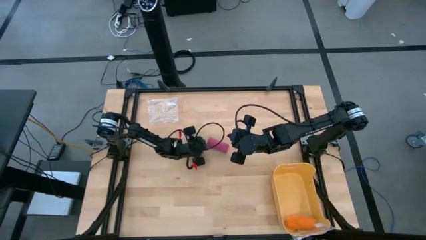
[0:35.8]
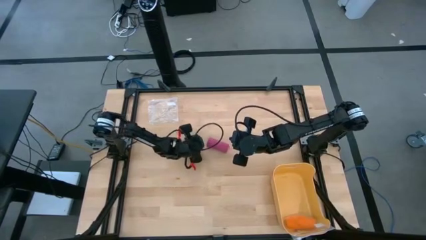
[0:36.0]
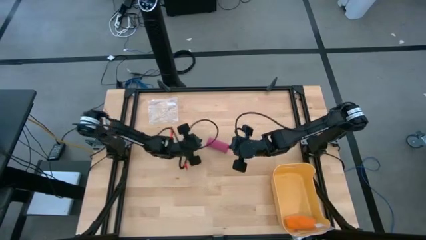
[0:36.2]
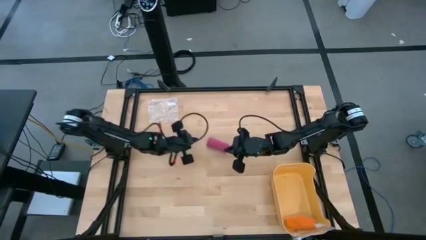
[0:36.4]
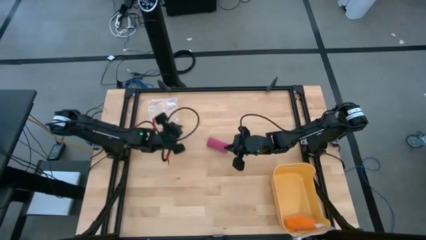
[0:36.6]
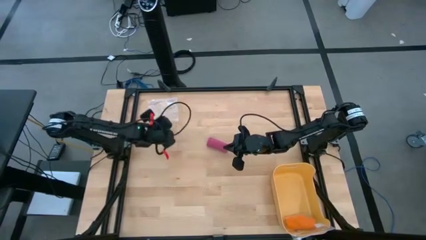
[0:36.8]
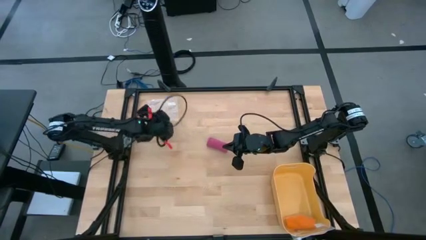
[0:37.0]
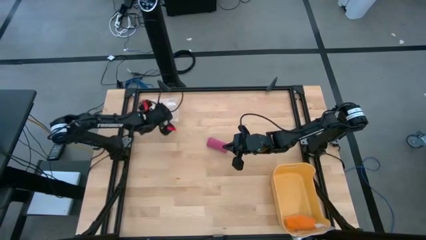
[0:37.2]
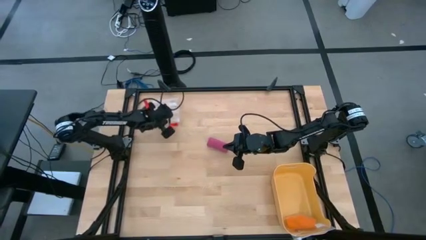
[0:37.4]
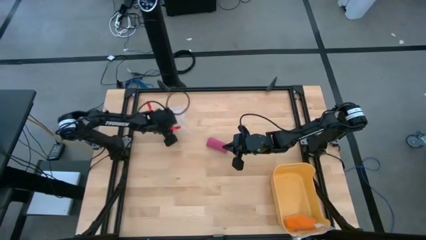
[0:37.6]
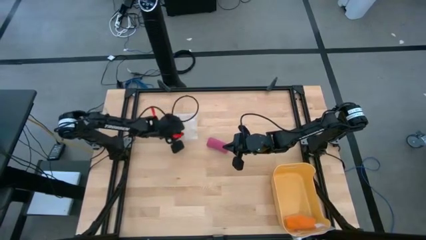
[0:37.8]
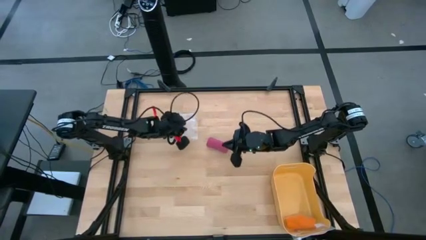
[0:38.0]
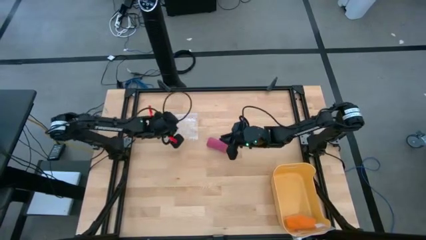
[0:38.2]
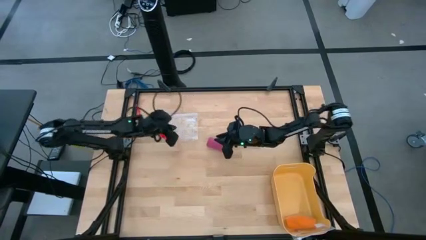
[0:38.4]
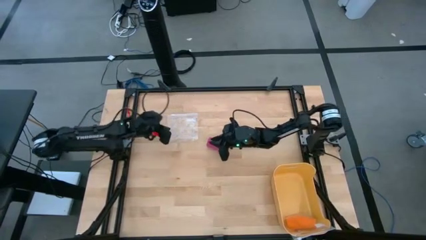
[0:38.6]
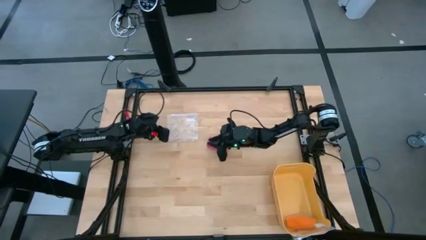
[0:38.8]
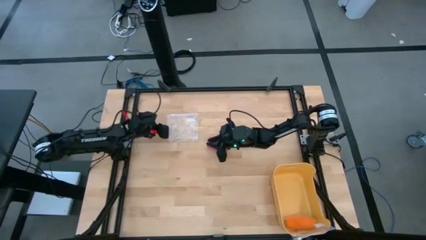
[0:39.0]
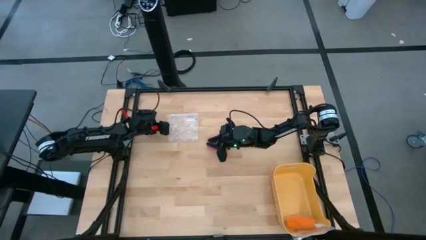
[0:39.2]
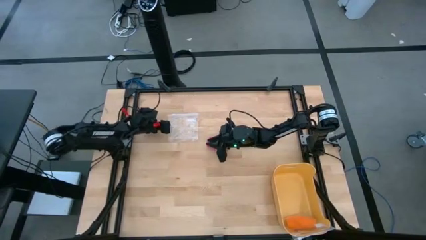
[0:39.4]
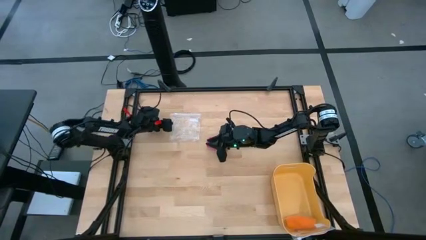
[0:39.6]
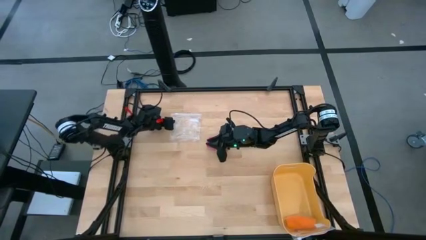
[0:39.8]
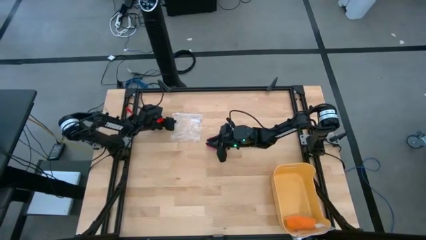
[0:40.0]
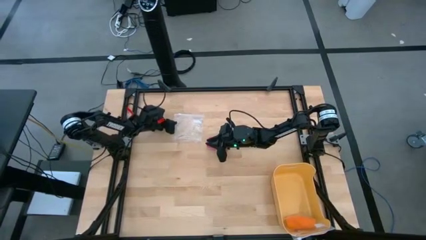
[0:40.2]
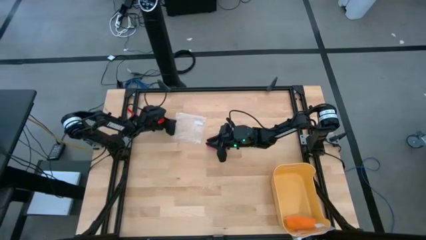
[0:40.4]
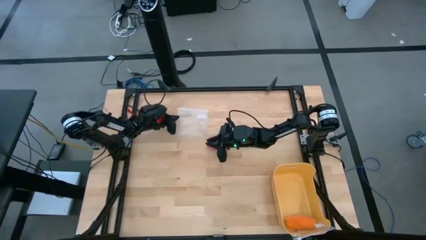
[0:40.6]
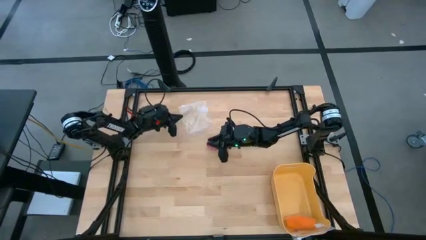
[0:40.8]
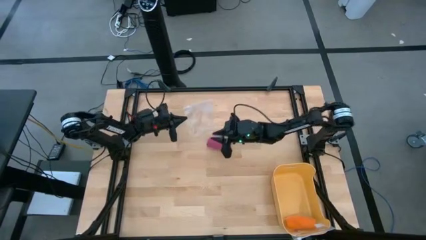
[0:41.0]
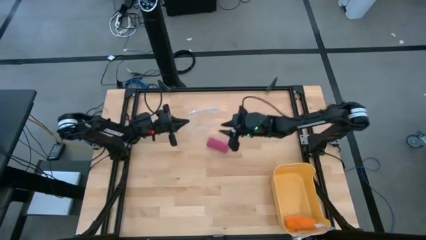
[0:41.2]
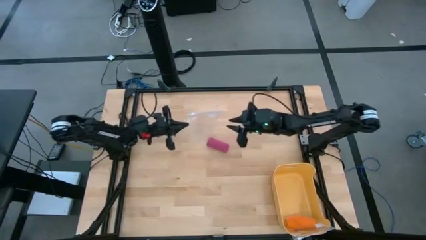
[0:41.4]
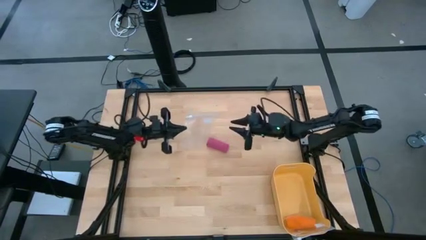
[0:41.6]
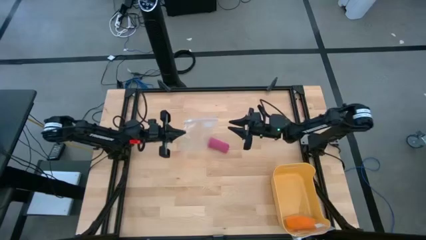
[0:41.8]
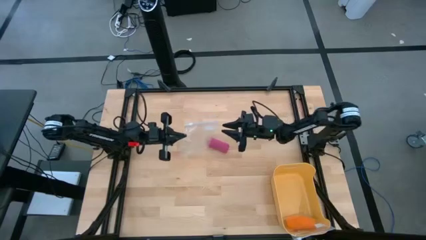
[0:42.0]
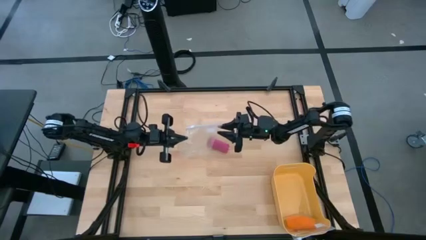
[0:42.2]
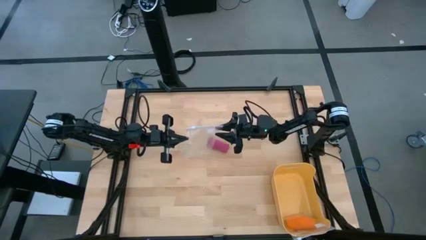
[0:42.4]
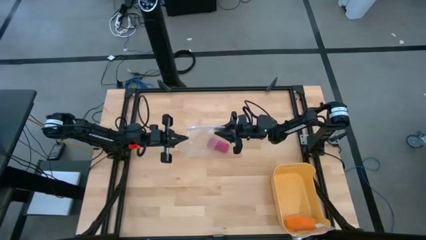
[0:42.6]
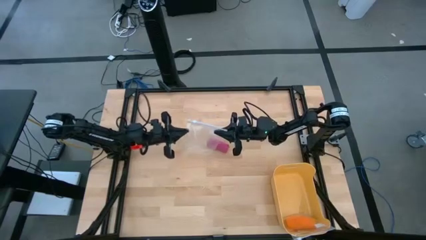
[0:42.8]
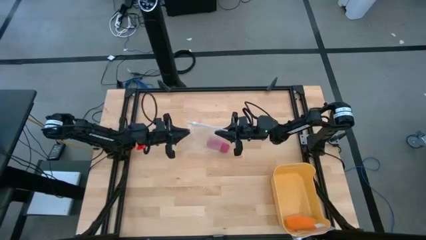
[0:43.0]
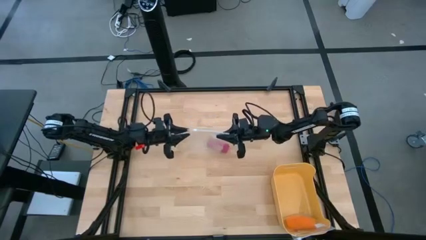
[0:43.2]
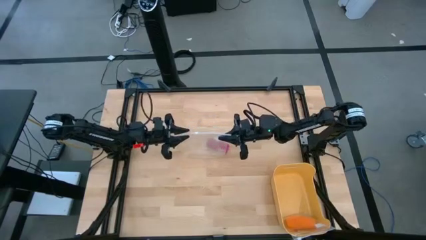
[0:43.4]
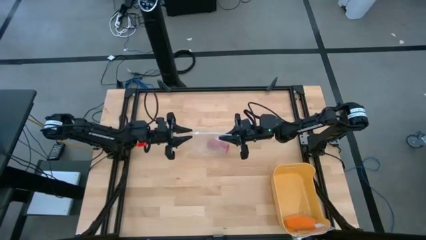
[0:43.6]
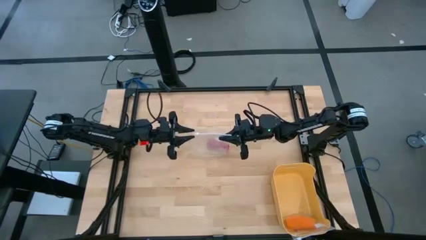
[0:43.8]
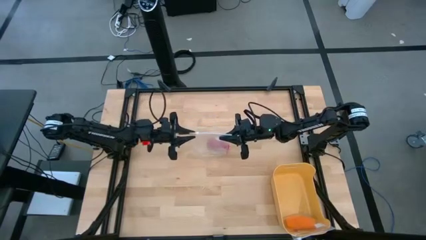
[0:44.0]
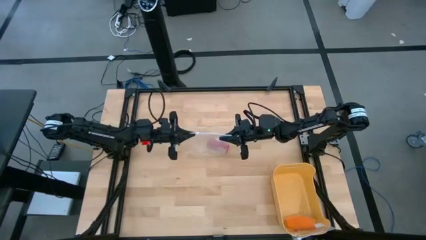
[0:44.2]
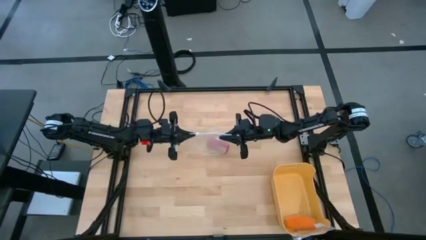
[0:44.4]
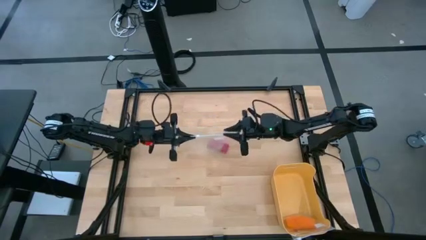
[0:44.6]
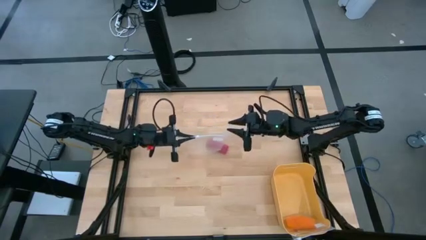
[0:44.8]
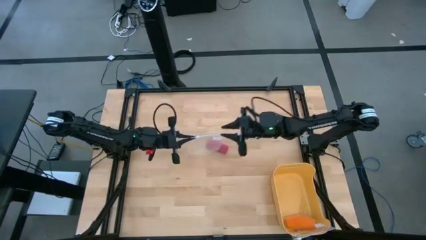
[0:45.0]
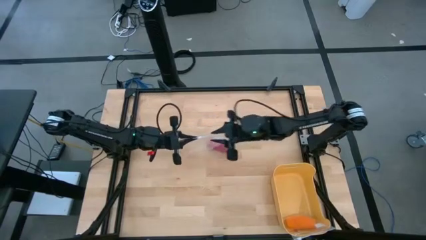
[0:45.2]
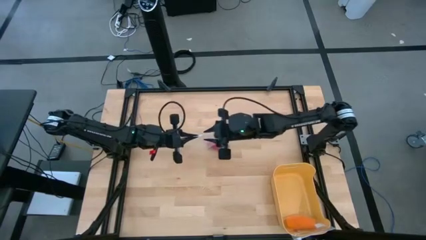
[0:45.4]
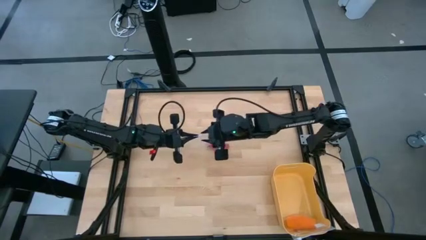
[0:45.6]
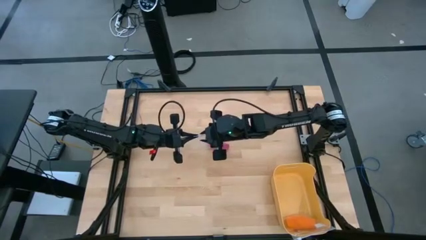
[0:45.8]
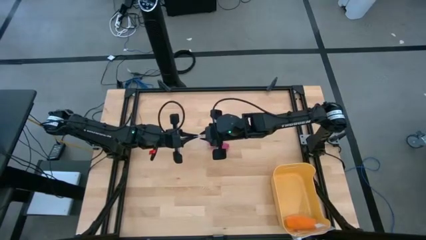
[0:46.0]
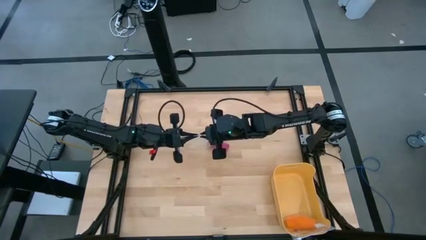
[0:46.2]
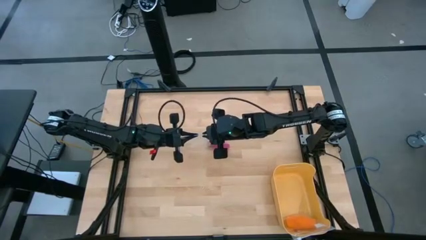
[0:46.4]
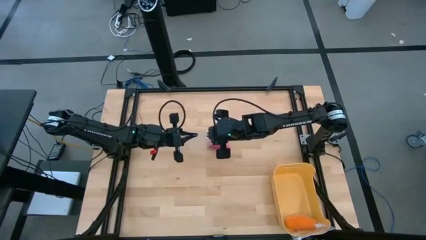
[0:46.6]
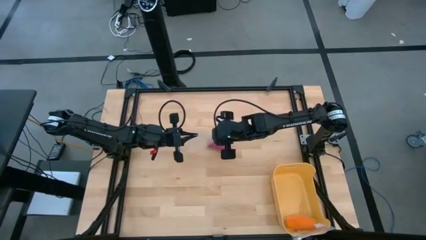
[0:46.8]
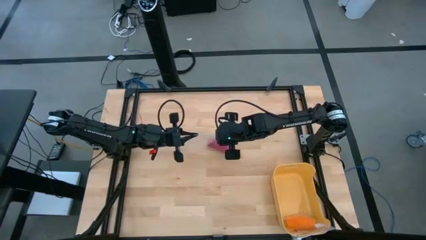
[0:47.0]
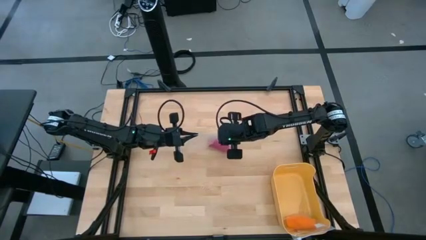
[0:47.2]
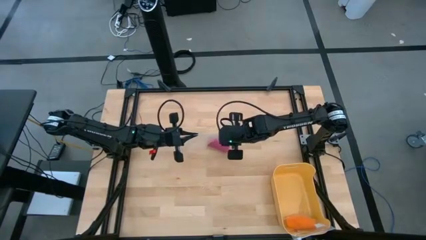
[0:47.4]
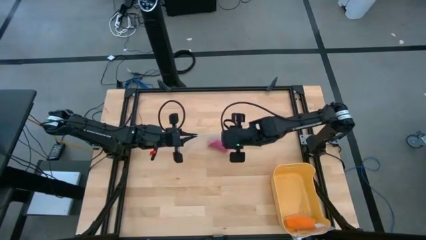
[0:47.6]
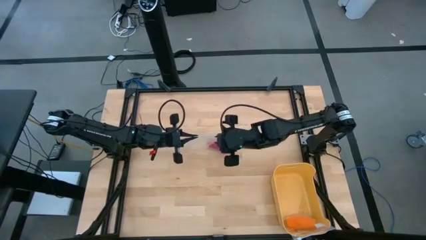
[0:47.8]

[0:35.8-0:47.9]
Task: Roll bandage
Open the transparent zip bag
